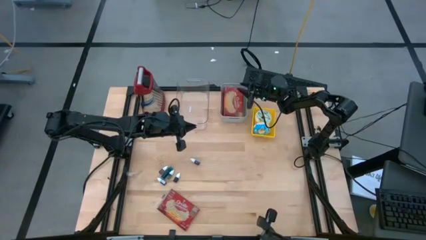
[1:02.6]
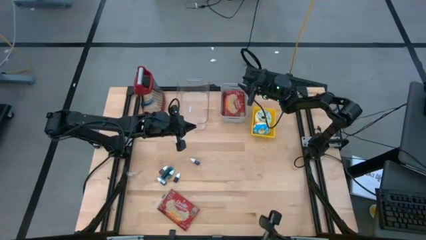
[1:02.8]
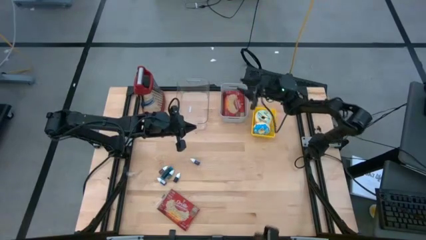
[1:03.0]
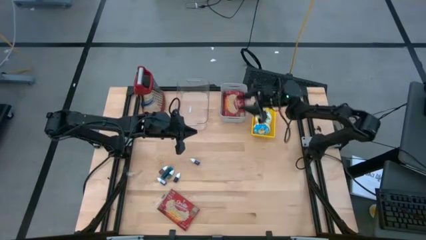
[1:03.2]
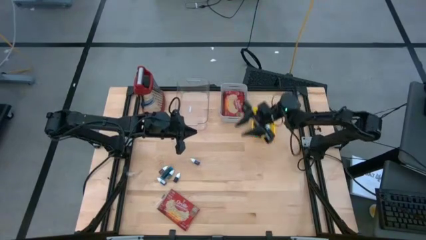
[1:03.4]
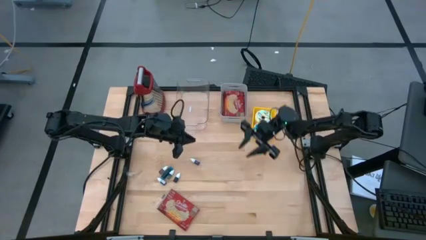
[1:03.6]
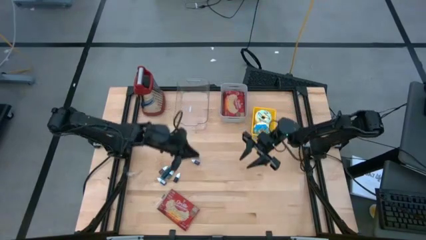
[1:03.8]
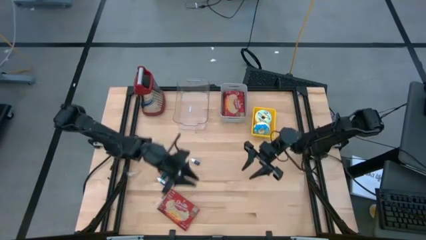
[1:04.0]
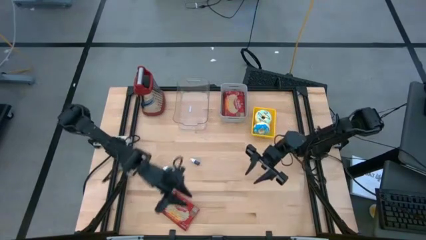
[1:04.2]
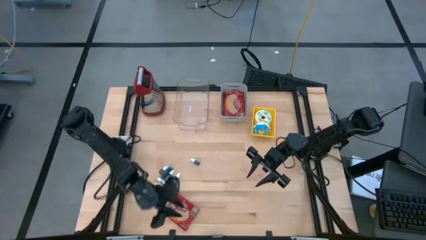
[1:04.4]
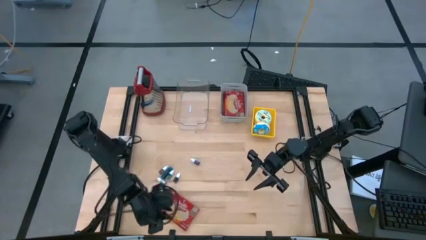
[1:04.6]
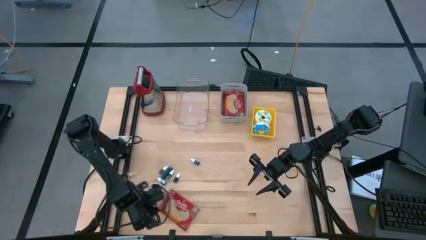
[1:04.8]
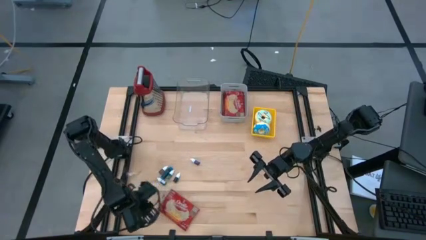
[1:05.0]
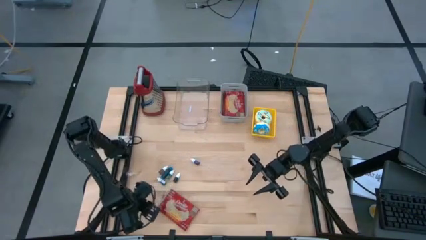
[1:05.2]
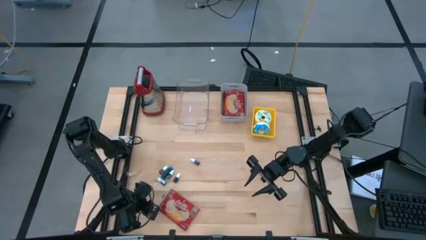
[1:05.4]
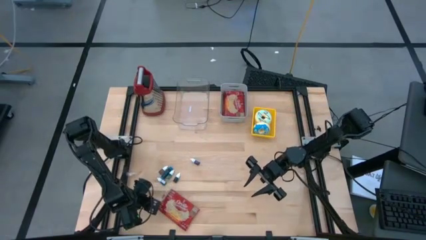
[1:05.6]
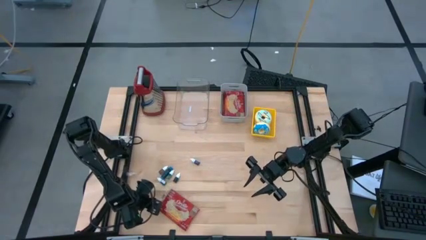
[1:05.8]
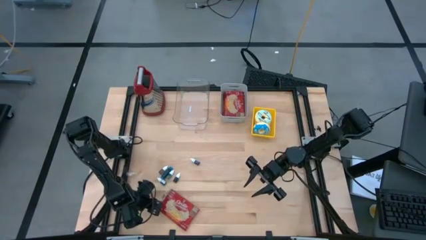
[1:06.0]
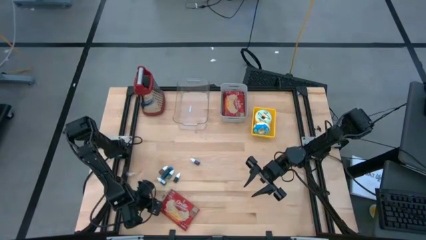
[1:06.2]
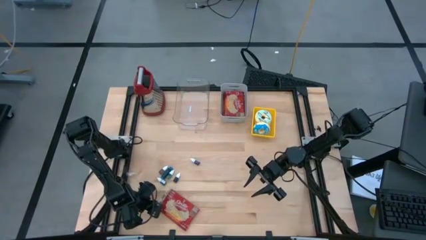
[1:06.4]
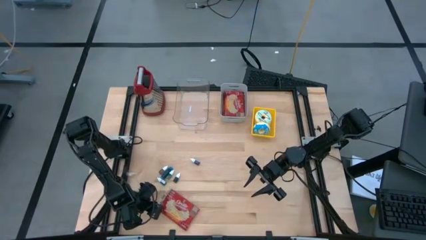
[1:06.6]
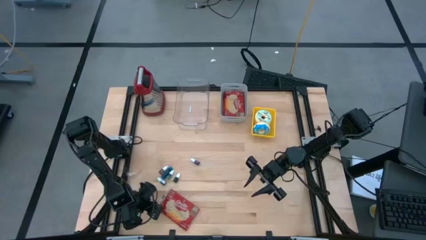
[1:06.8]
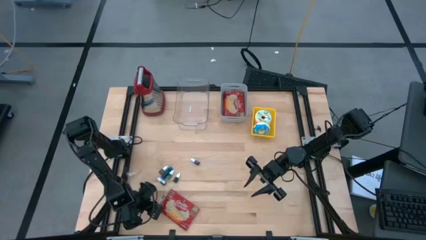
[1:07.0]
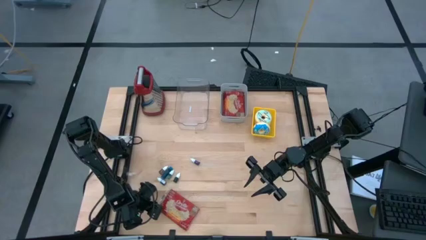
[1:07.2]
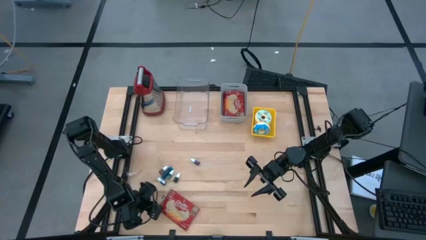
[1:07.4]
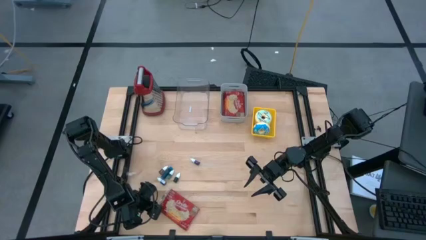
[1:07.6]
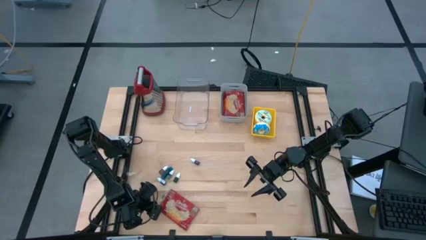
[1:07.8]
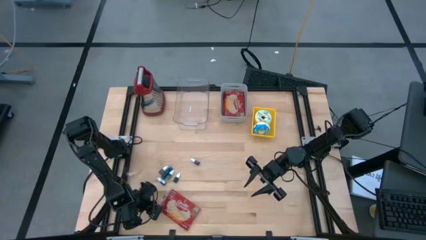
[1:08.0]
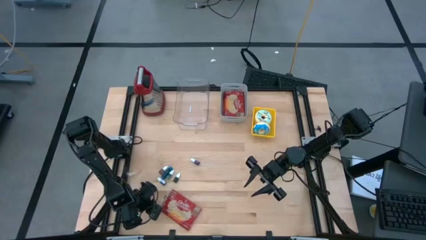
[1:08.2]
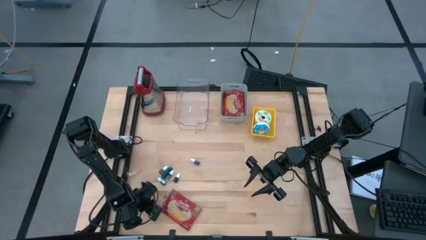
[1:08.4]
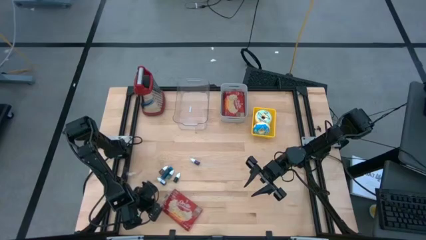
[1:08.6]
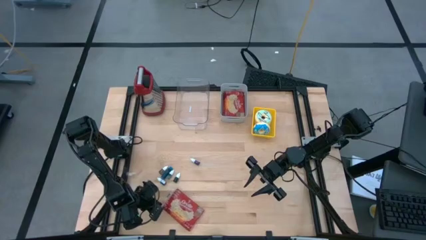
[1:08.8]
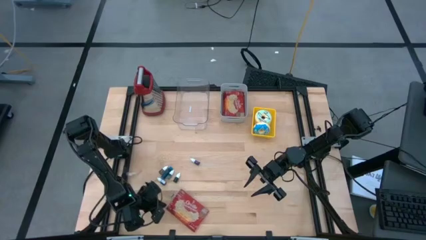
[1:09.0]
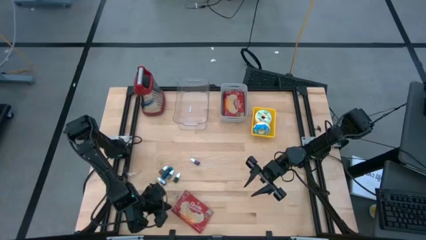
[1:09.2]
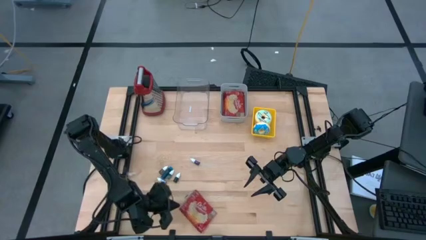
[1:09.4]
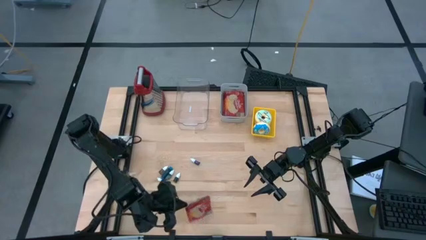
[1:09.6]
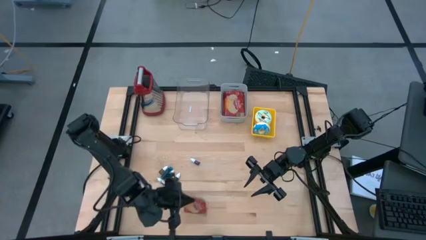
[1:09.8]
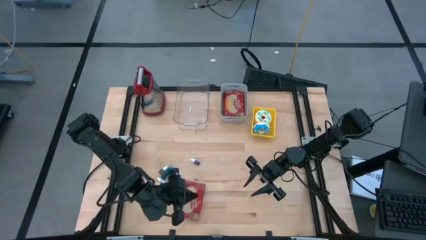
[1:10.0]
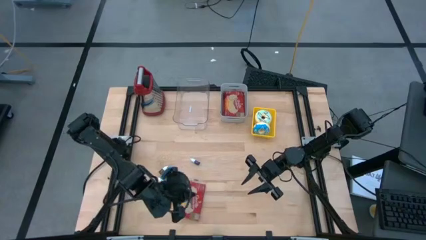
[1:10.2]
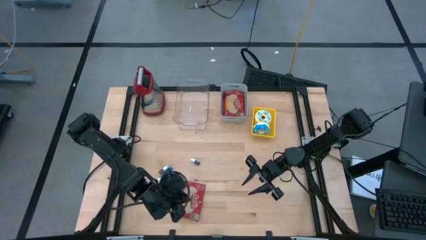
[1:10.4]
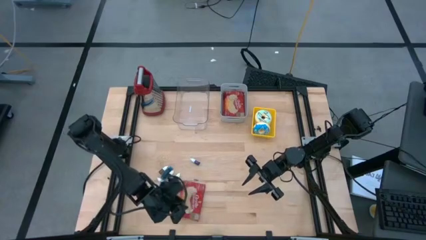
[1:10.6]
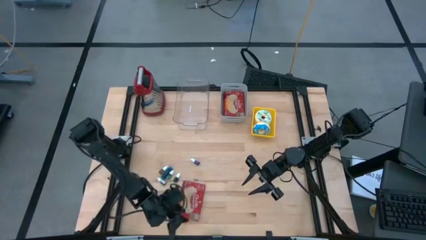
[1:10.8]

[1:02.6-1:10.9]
Task: Pick & Place Food Item
Put the popcorn bag into the gray bin

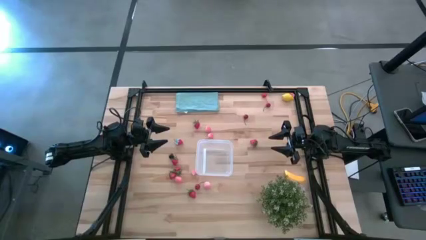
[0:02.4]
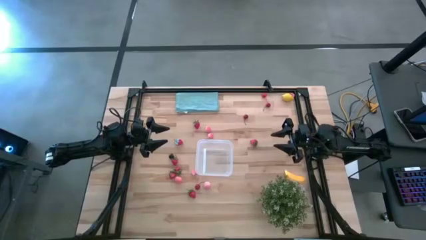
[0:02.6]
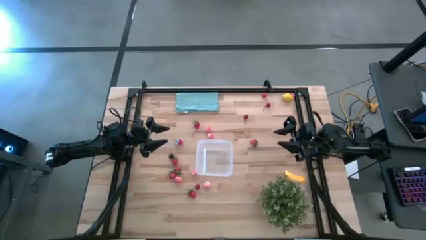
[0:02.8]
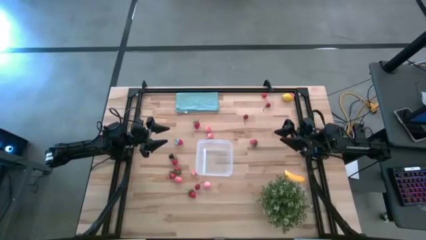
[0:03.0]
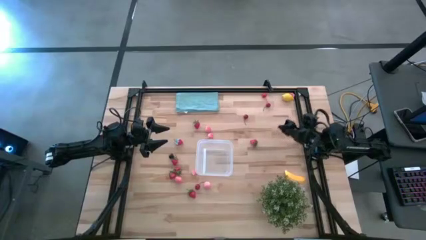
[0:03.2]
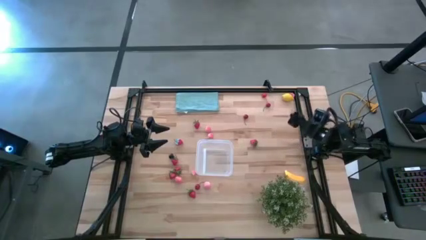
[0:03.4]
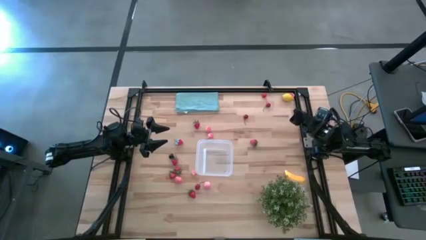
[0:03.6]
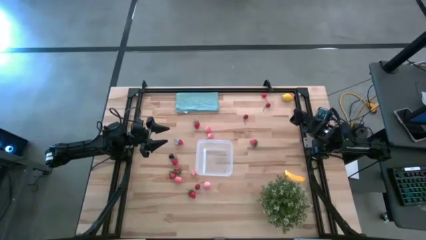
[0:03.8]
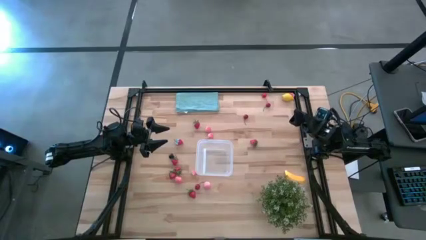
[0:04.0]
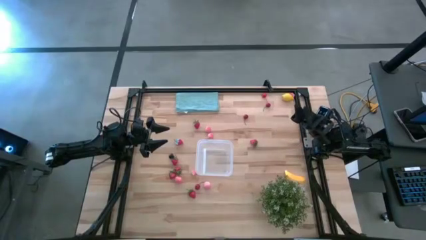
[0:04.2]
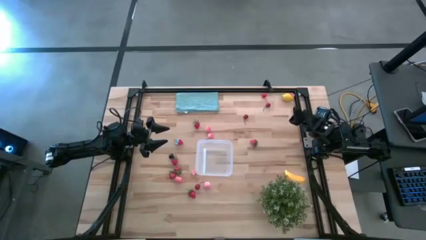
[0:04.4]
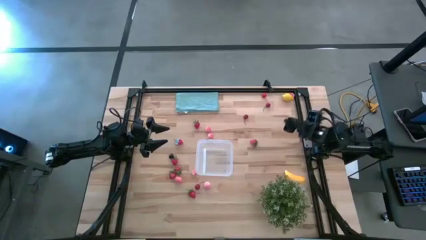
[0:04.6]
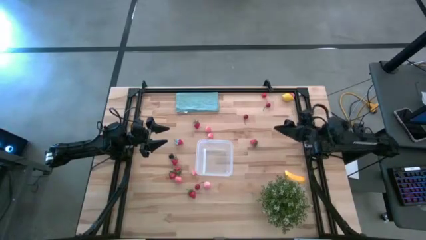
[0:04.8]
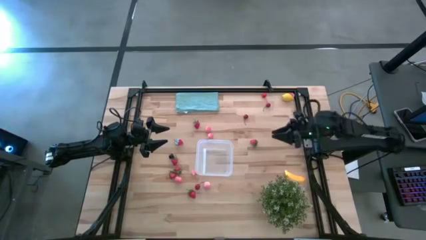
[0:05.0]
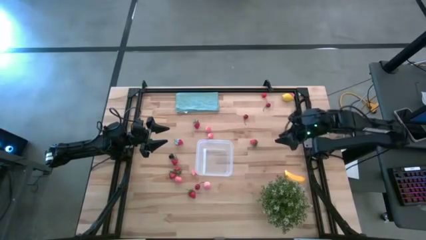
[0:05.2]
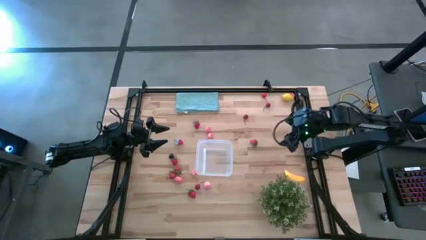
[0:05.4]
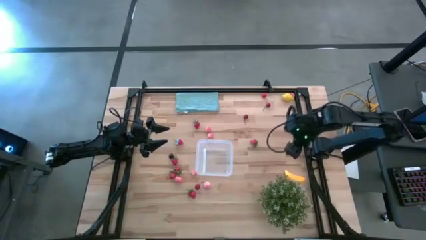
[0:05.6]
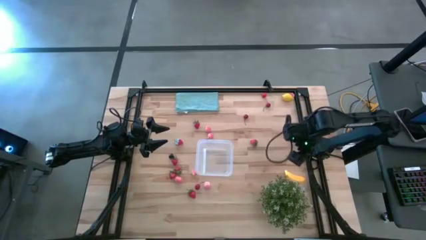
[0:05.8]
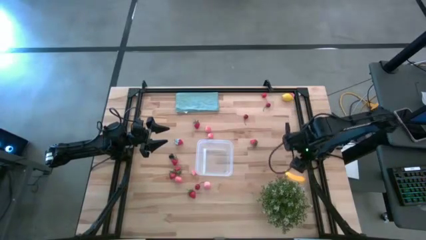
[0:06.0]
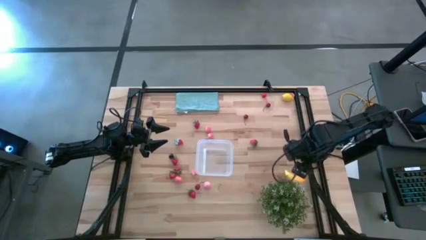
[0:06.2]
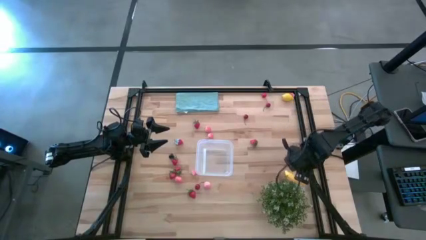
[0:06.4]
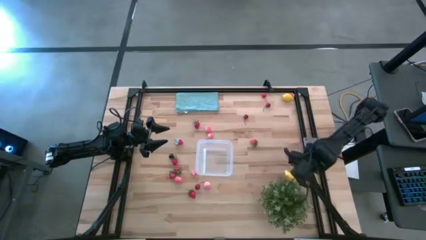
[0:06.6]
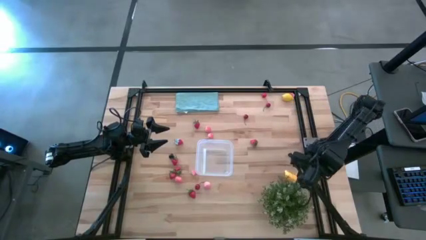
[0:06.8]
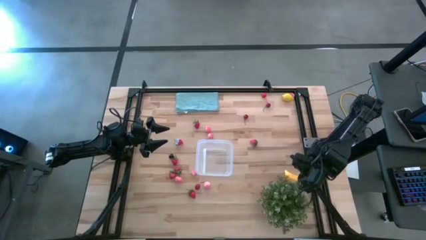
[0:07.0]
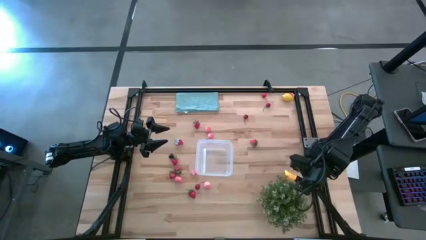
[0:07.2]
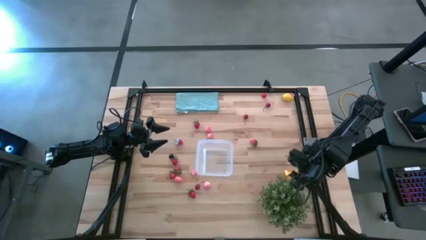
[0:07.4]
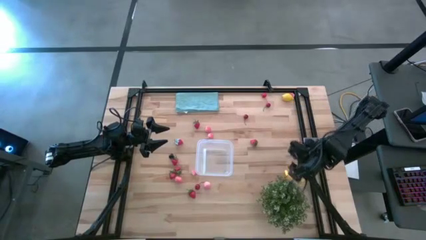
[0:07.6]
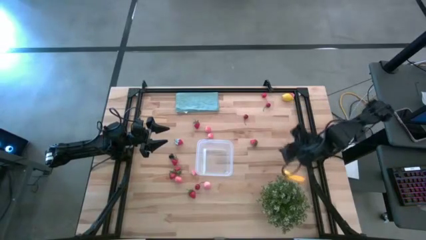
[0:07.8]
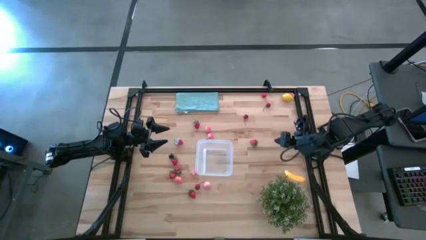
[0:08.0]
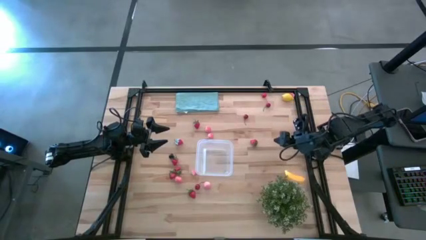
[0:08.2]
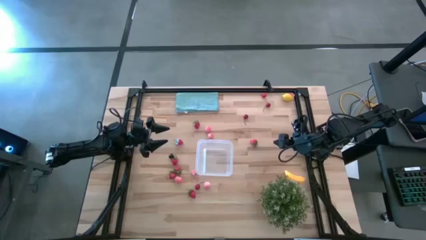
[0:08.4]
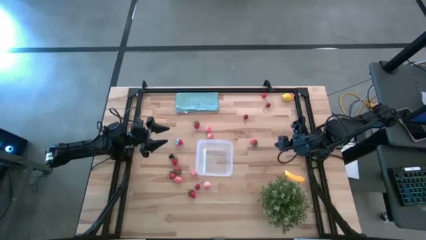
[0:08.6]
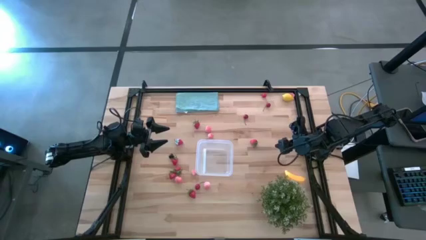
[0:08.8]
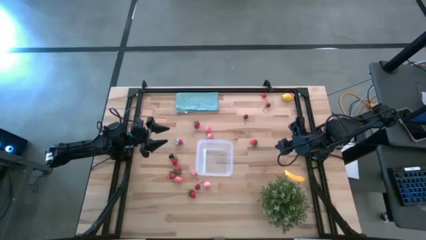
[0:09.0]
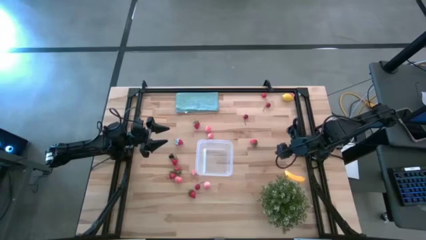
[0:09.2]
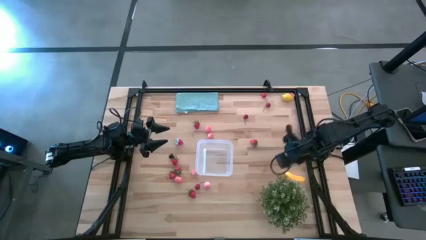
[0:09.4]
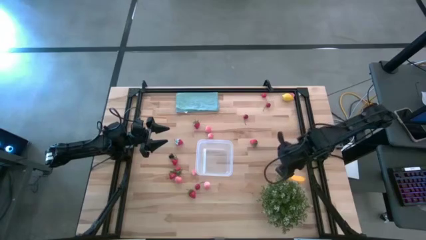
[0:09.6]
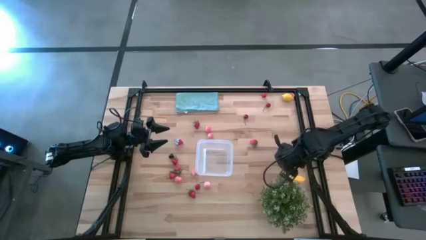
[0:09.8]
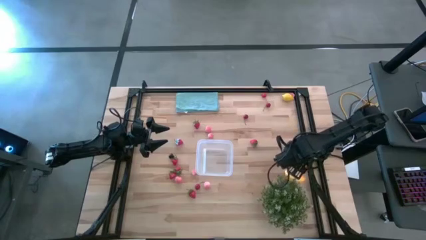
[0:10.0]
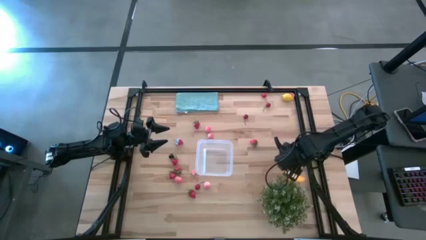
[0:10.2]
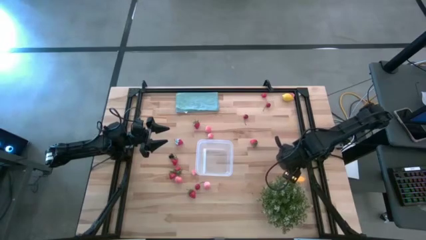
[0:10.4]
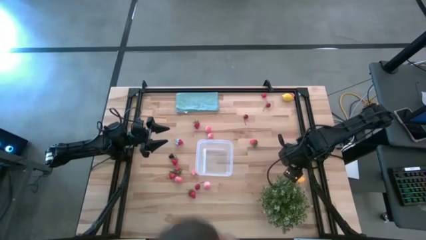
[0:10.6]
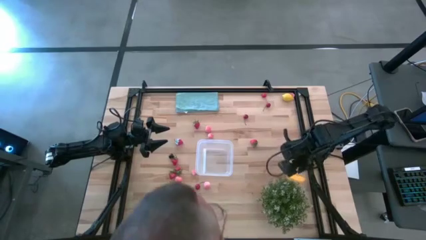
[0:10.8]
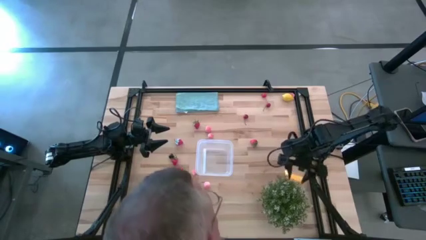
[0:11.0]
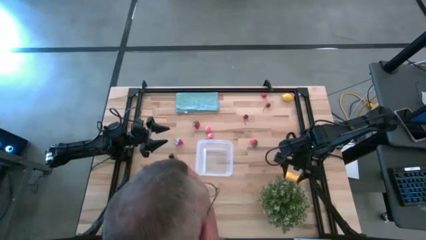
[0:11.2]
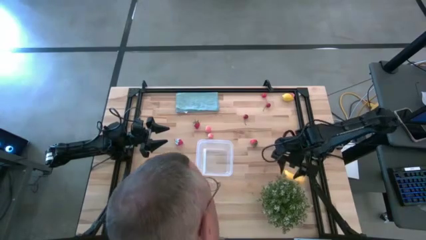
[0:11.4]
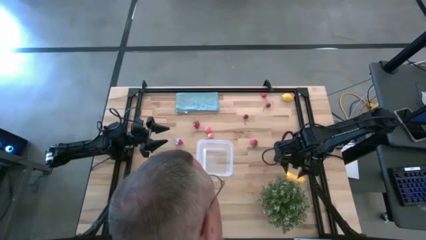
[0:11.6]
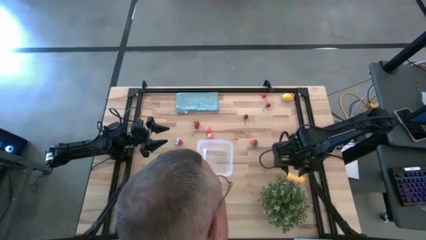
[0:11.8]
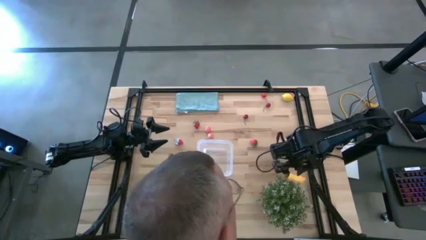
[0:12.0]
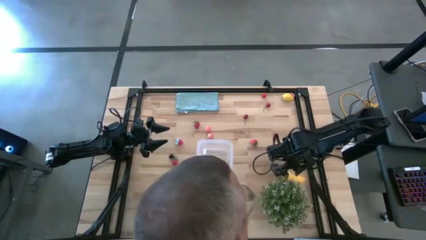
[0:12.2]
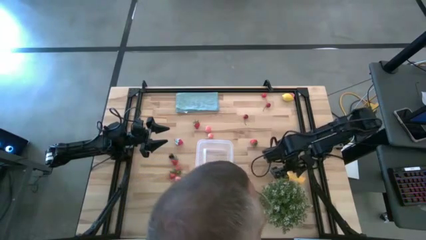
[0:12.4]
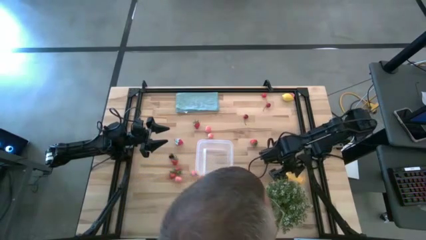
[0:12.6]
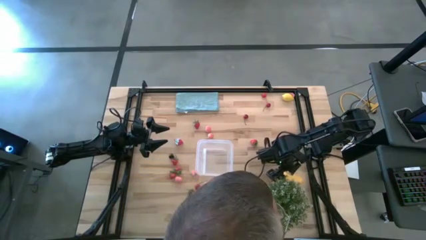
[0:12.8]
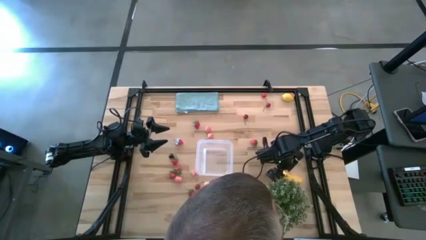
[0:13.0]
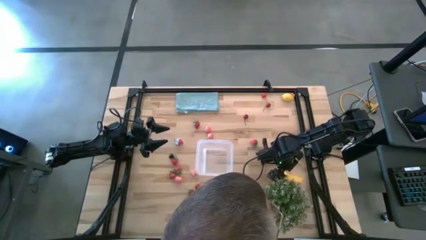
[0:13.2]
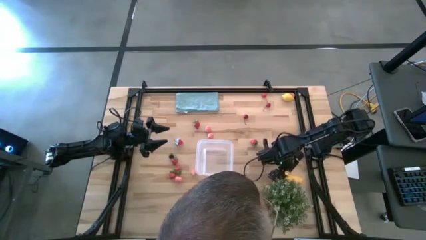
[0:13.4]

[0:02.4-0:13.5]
Task: Pick and placing Produce into tupperware
Put the yellow banana into the transparent bin
